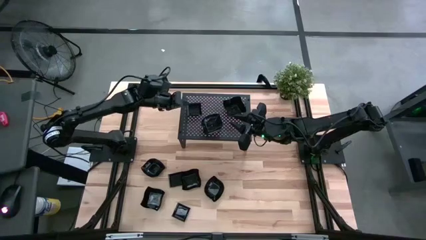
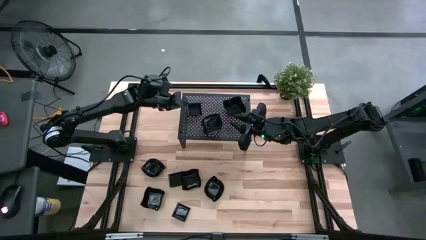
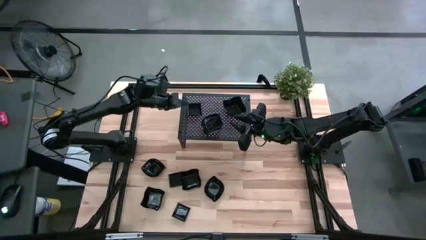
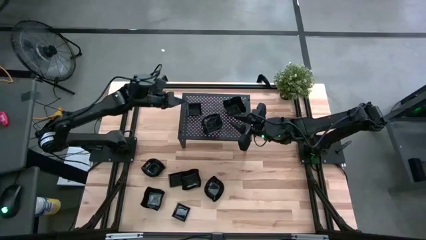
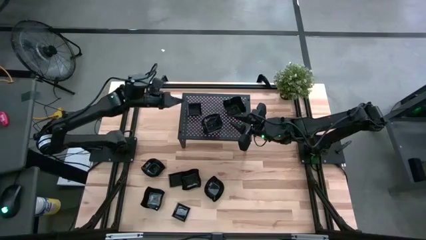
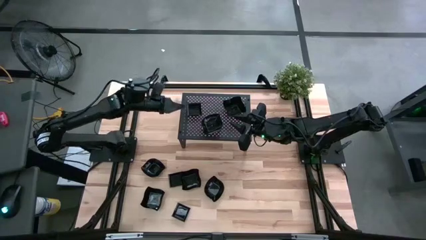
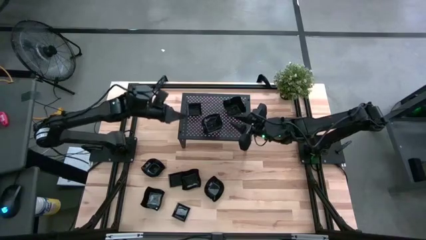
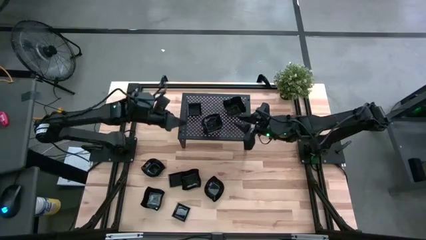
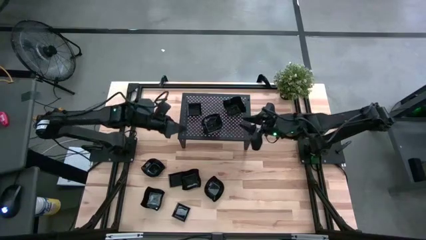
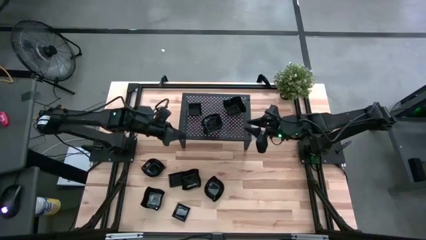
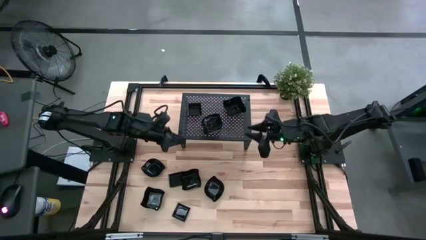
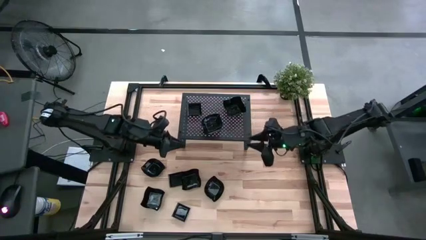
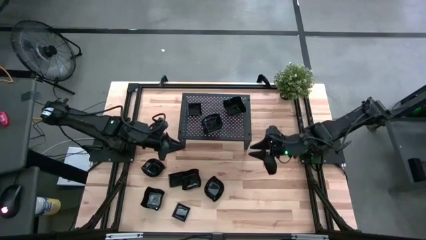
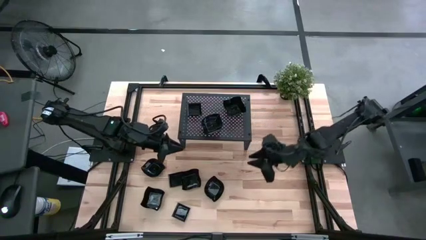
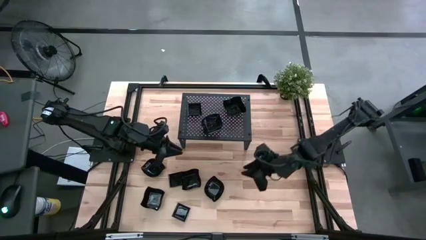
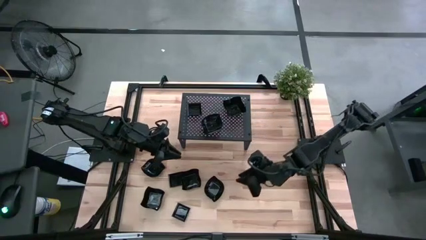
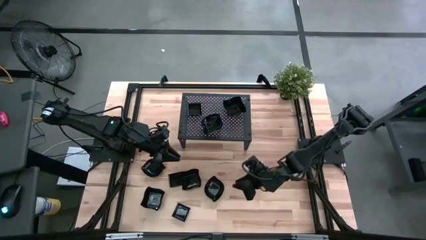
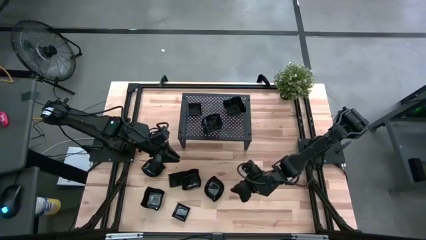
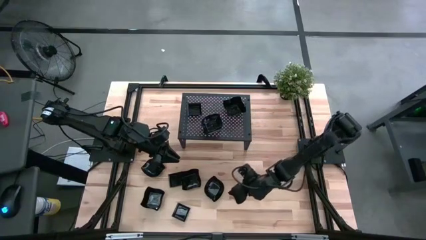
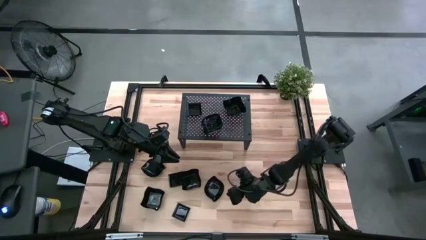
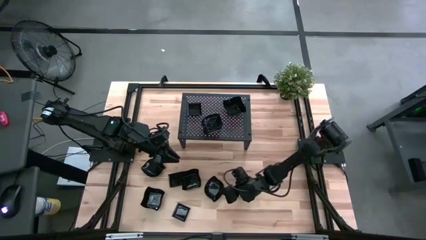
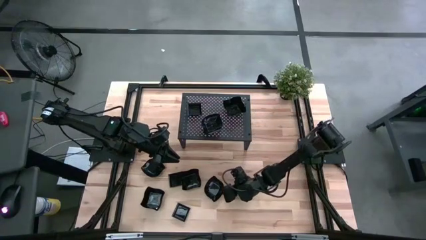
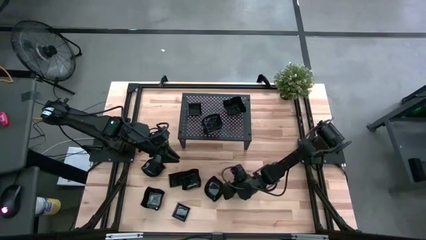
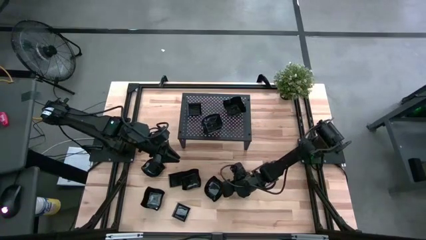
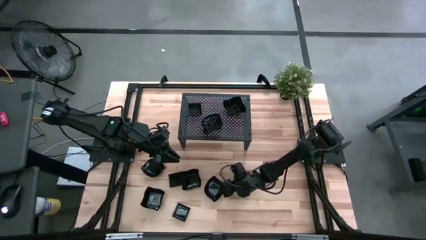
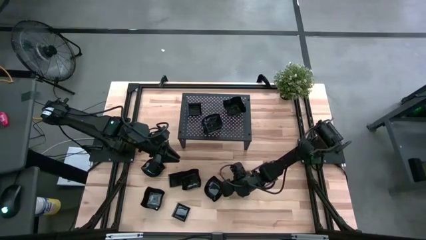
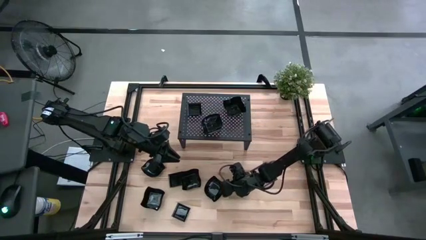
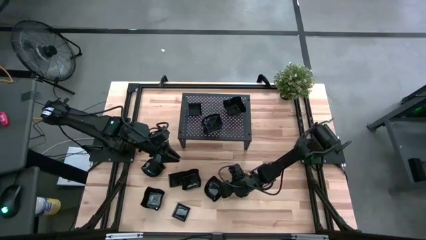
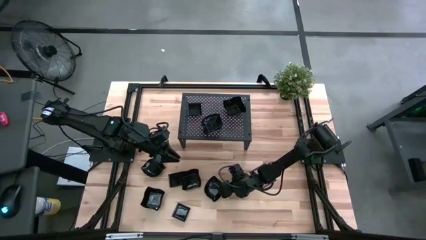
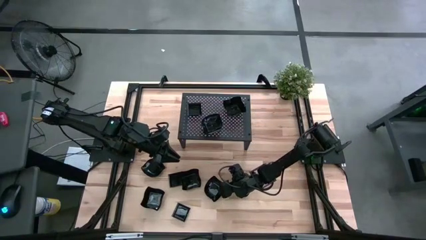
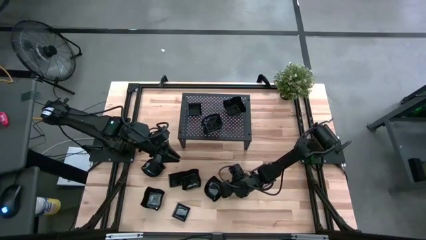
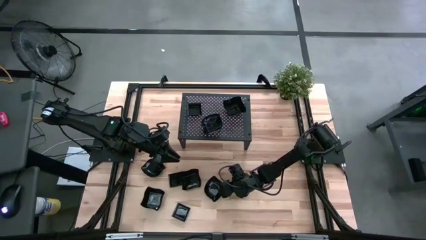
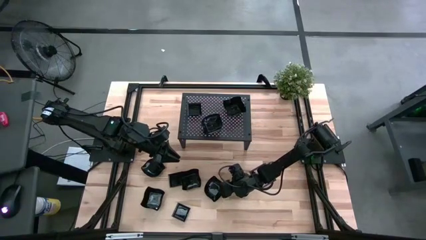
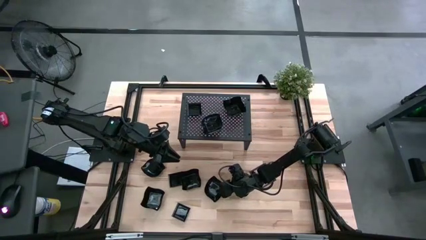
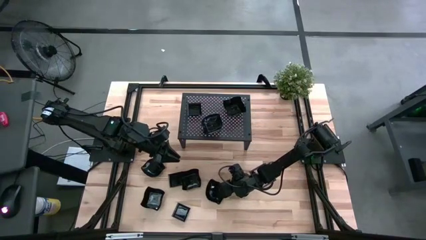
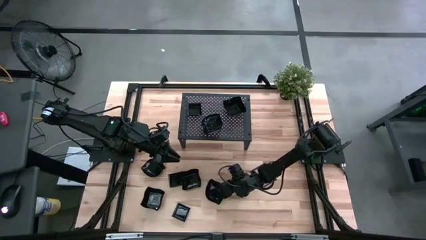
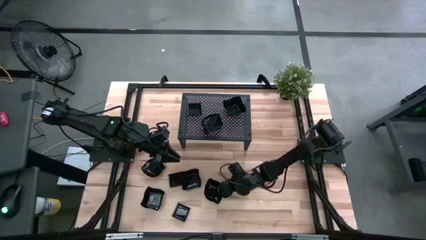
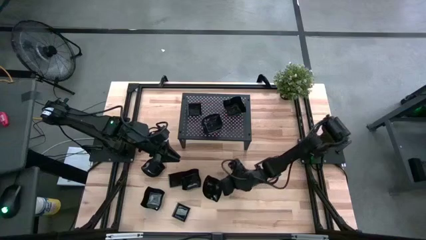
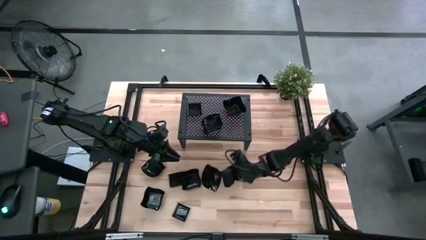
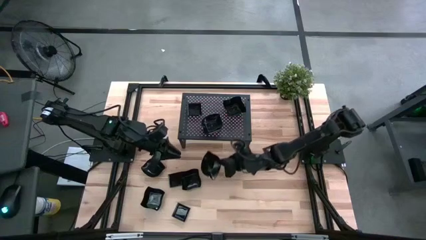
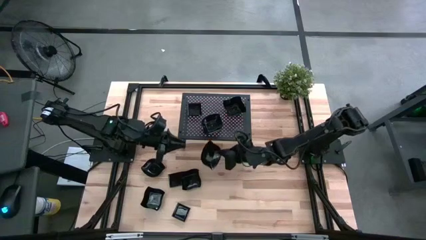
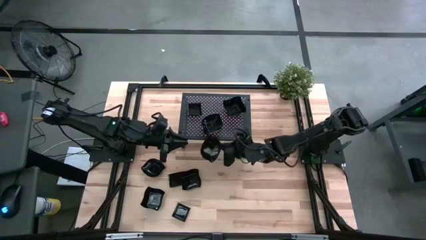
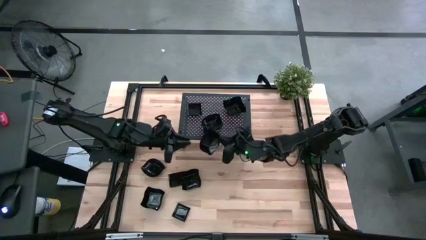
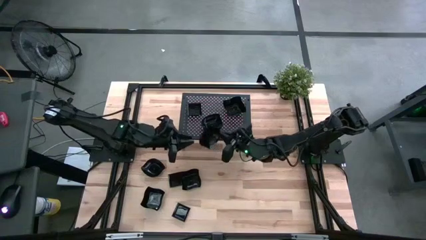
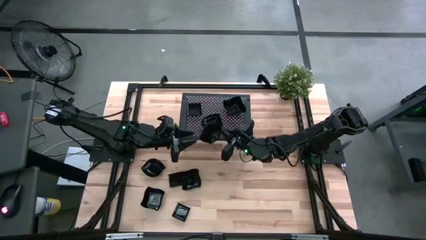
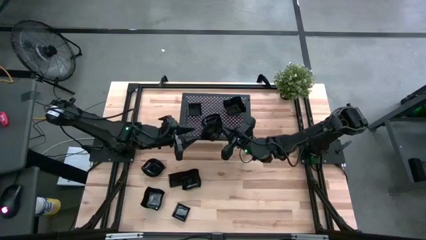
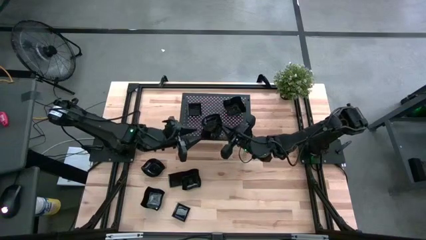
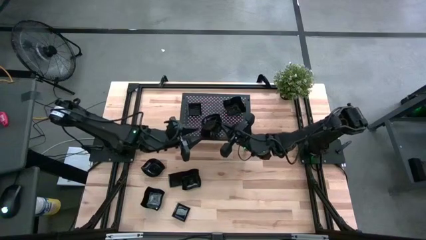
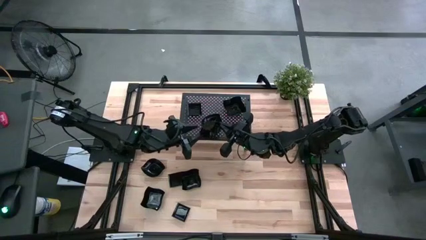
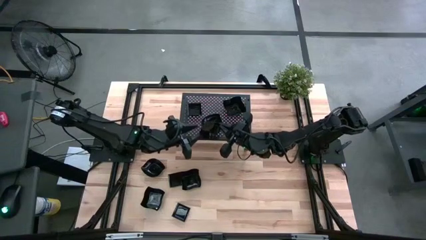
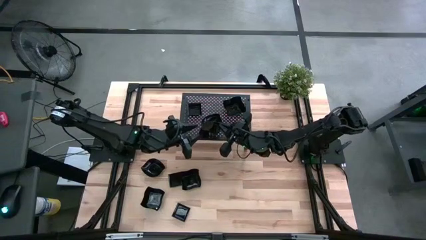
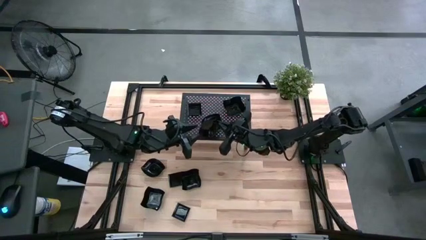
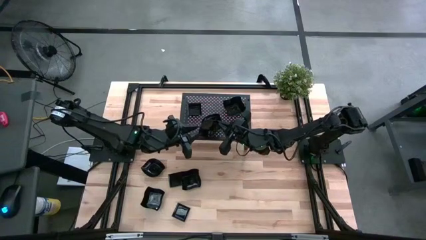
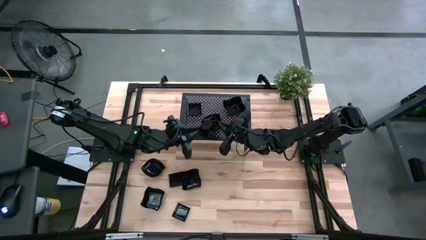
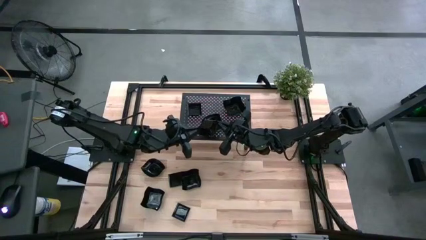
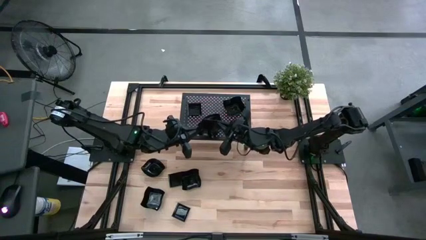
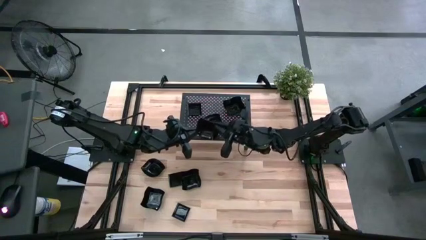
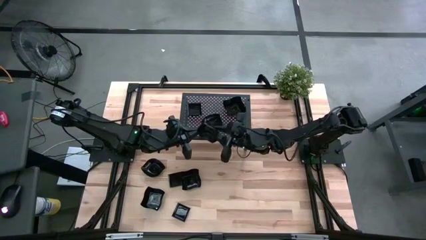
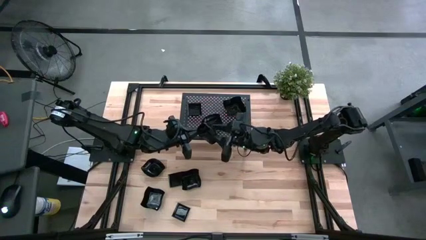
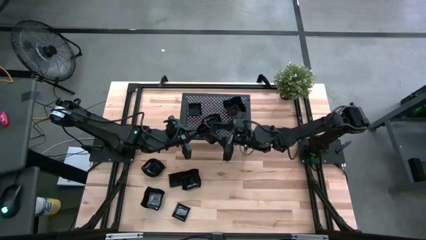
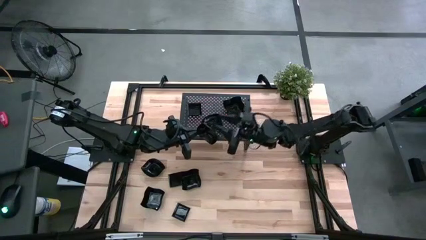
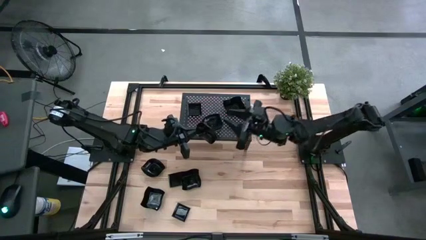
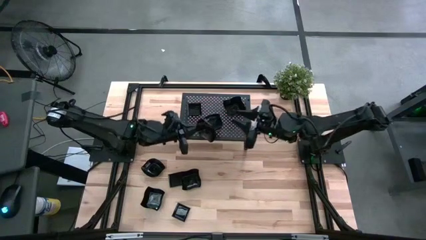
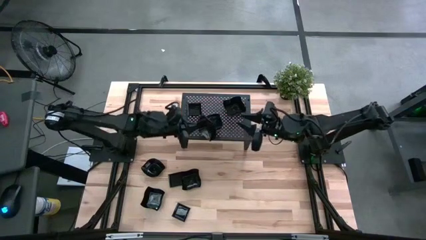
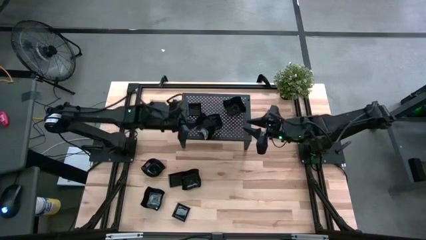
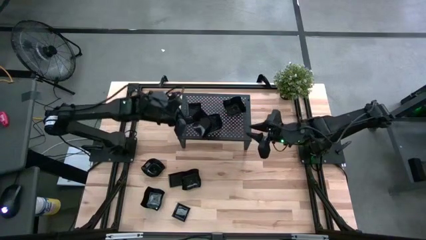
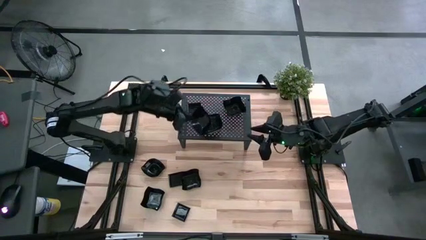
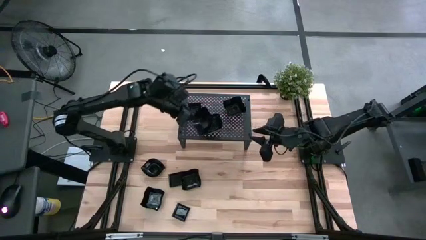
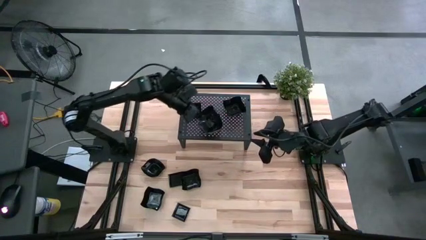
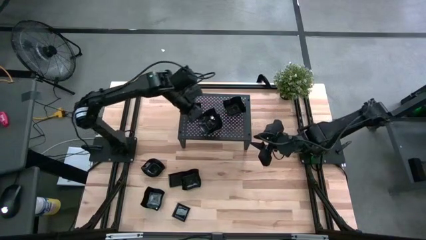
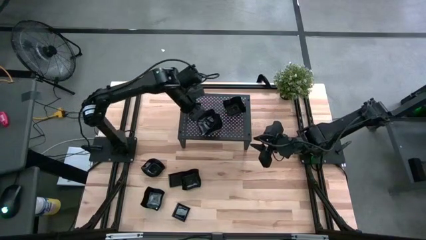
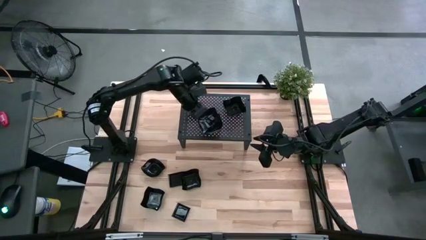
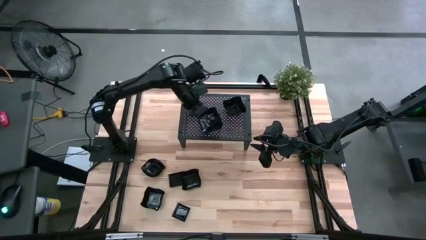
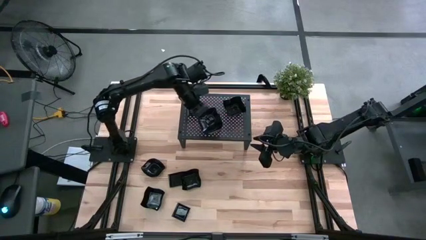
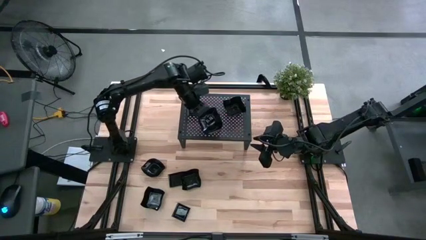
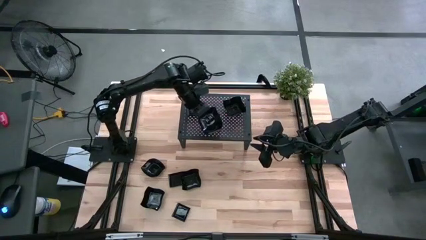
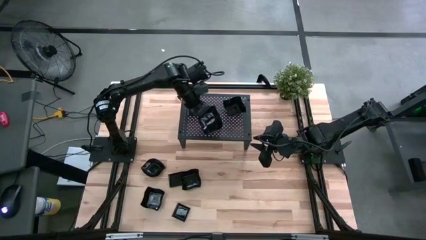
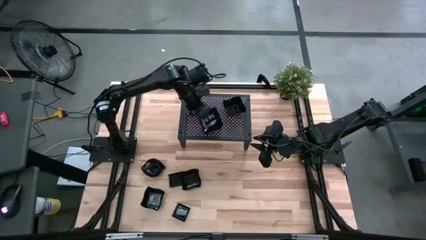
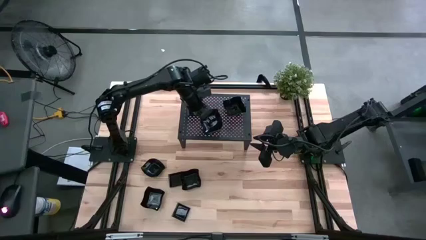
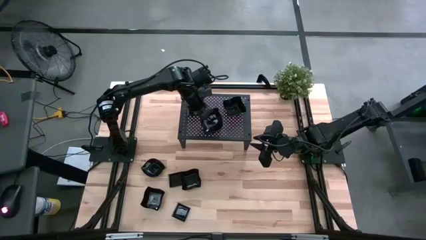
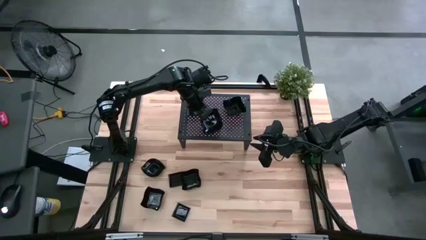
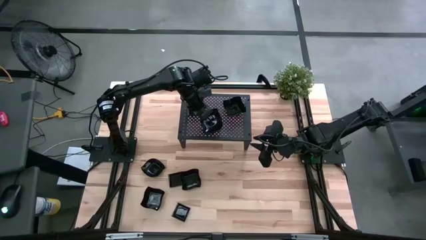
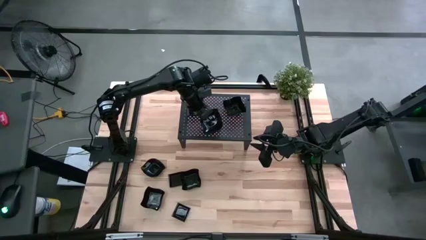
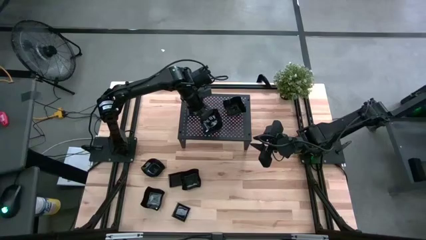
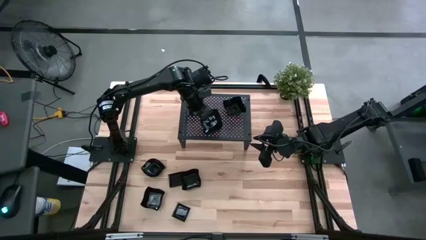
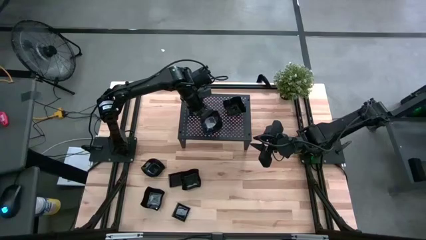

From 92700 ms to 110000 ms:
Task: Pick & Place Mini shaped plates
Stack the black leaf-shaped plate on top of the black leaf-shaped plates on the shelf
